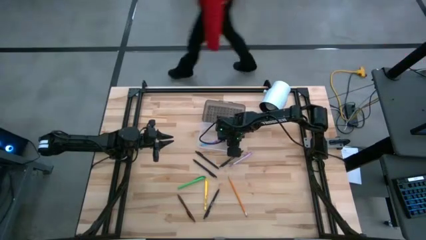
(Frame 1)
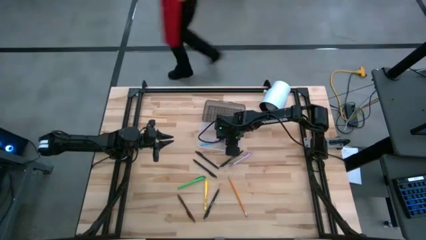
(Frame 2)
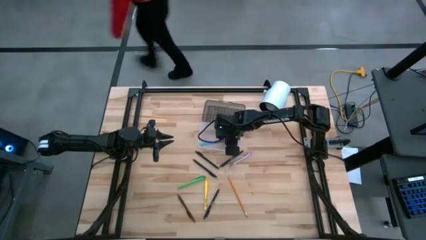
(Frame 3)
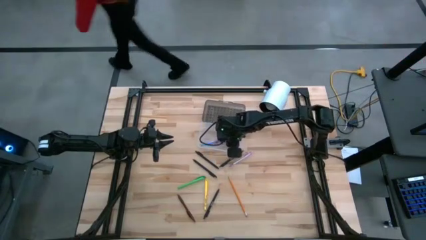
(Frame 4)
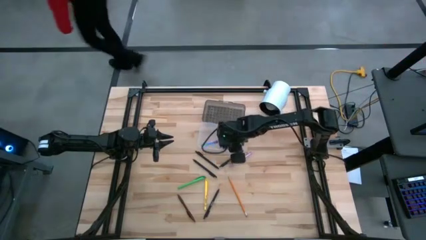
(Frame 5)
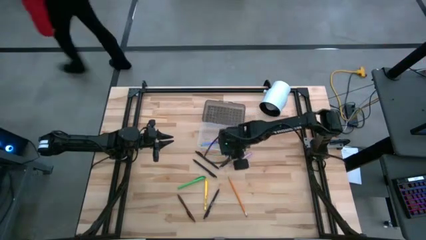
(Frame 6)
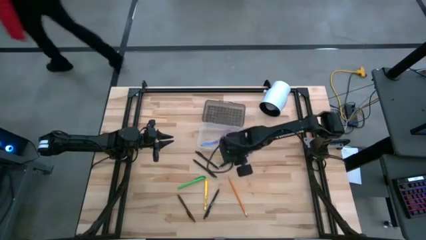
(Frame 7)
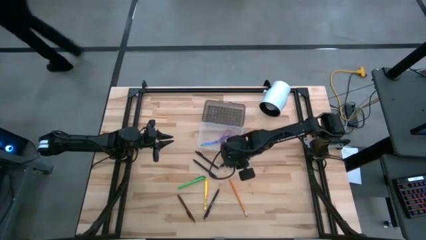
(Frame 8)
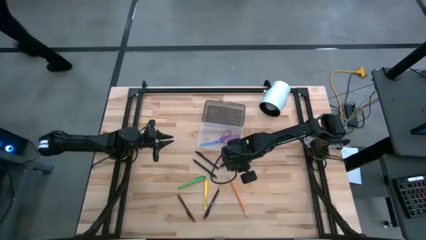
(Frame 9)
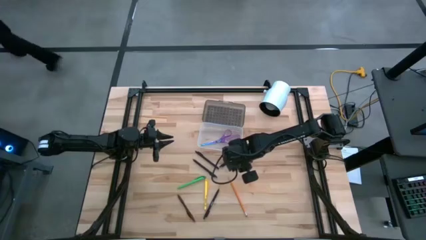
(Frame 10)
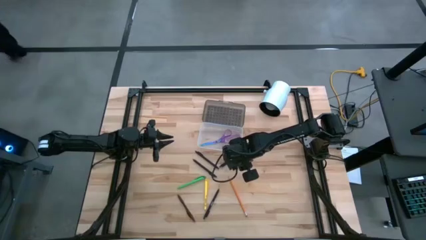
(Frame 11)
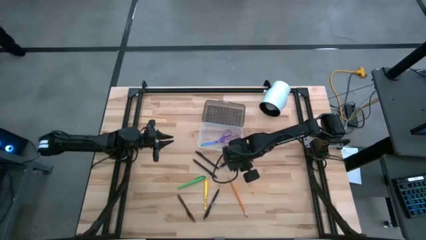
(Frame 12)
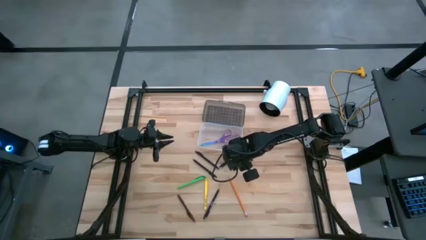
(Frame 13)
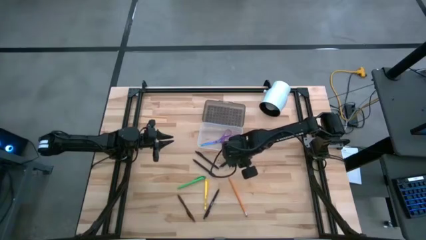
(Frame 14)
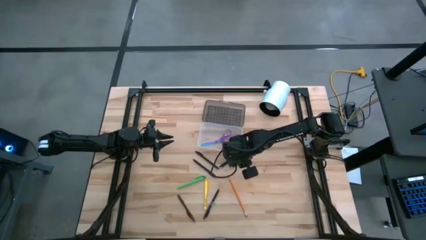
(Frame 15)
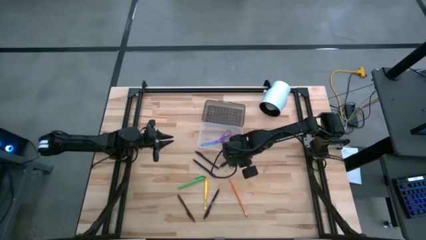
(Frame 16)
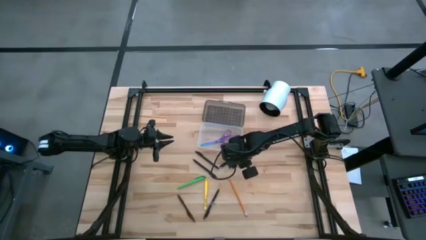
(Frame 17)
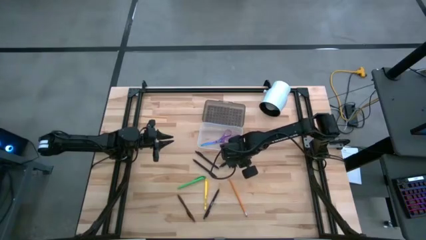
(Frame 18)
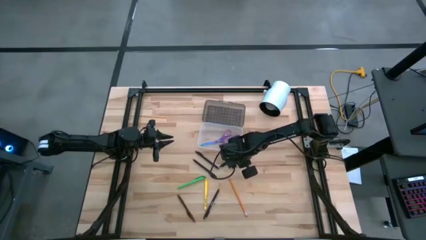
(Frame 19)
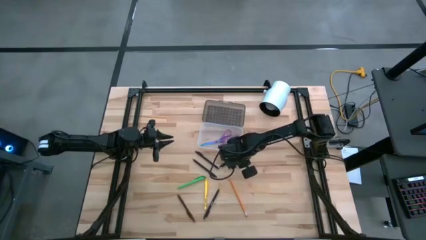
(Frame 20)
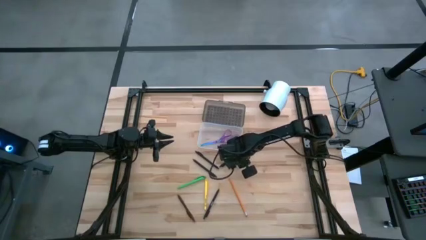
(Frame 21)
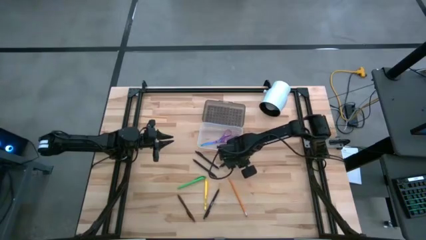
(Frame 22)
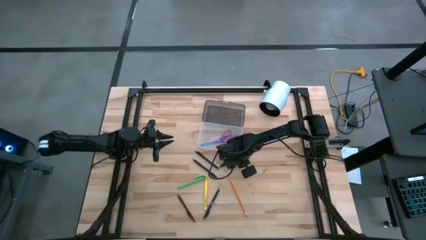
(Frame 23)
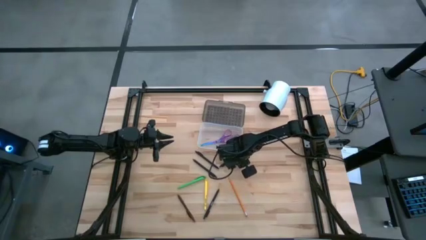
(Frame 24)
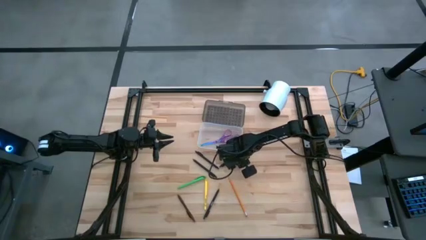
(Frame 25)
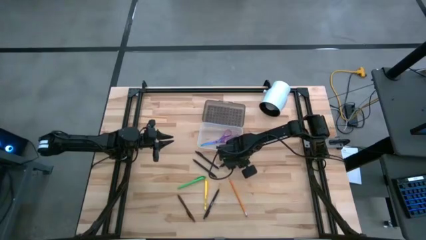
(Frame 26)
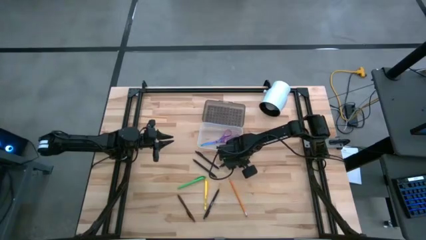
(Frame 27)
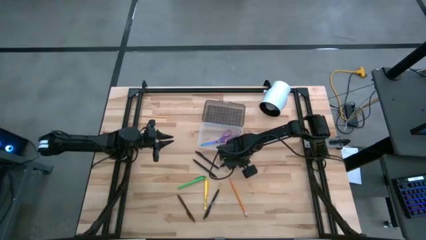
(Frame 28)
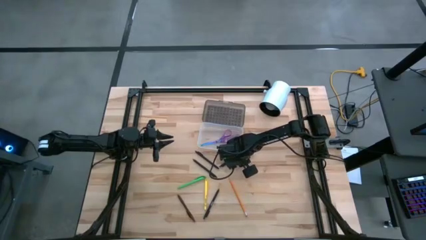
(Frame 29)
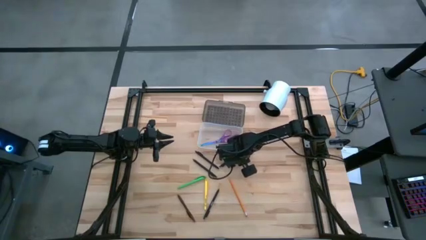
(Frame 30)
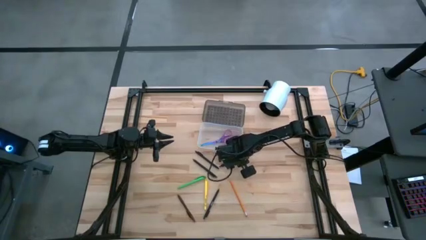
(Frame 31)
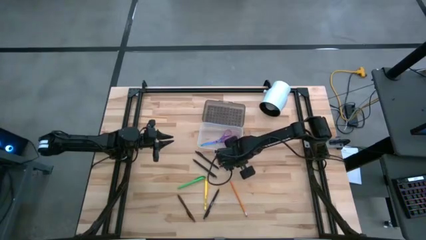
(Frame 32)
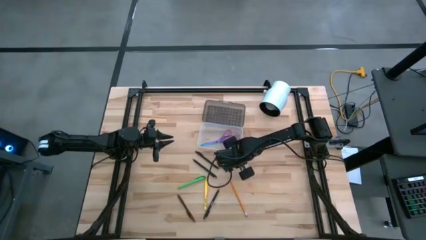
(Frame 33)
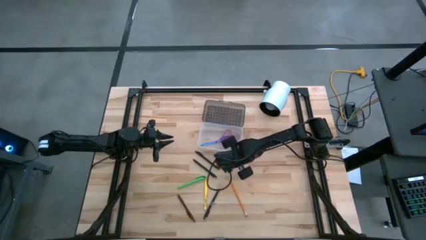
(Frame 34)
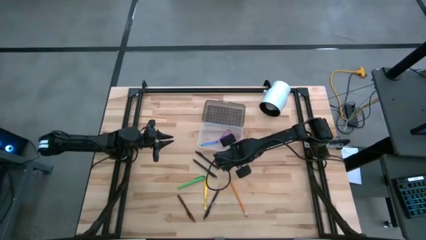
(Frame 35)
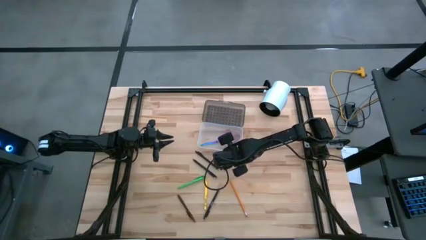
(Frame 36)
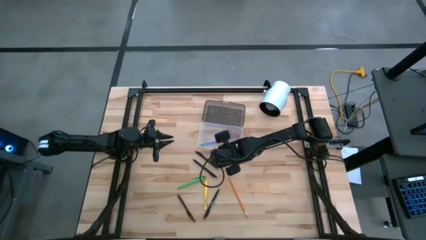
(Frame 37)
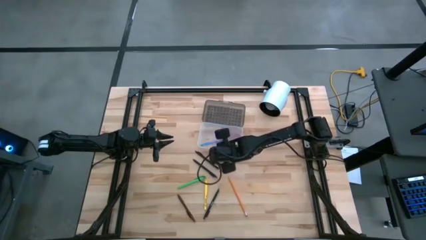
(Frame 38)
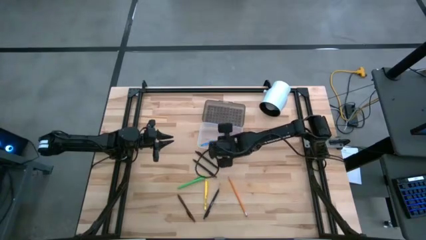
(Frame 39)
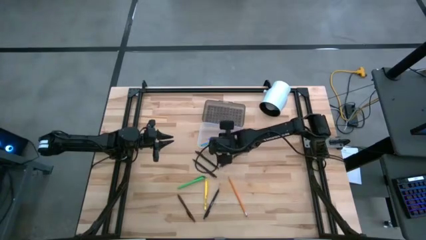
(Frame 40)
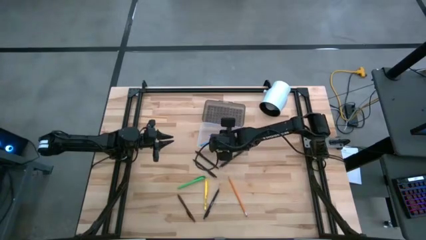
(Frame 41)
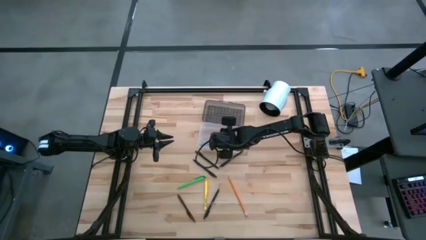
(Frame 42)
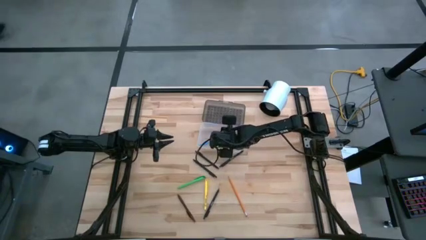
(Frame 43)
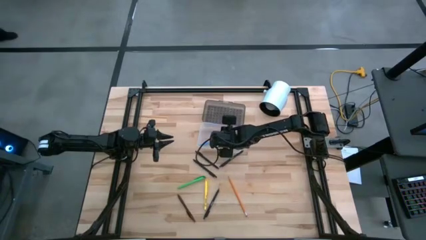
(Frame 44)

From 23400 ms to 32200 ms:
Task: Pick & place school supplies into a supply box
Put the purple pen into the supply box

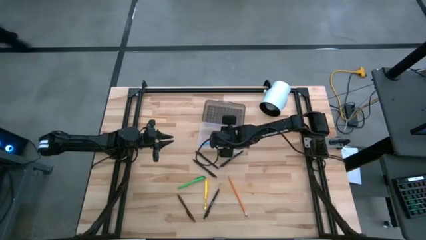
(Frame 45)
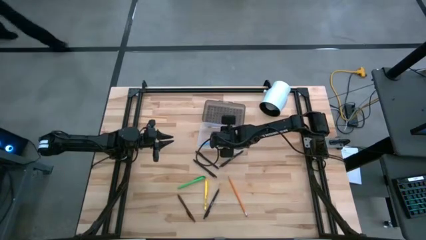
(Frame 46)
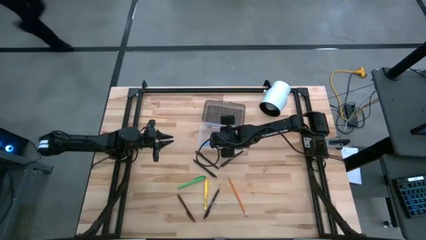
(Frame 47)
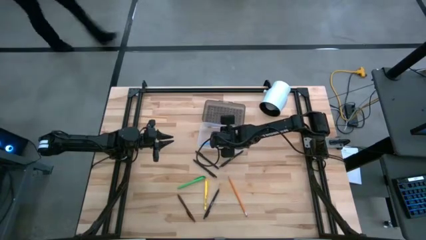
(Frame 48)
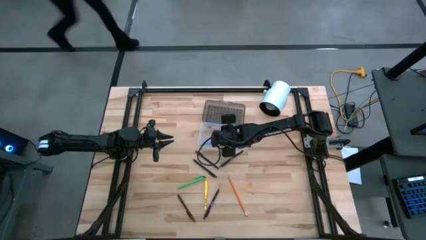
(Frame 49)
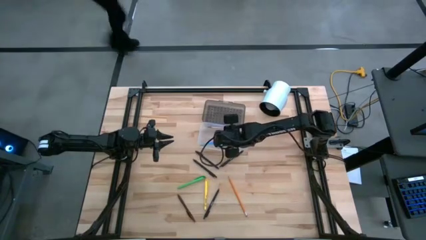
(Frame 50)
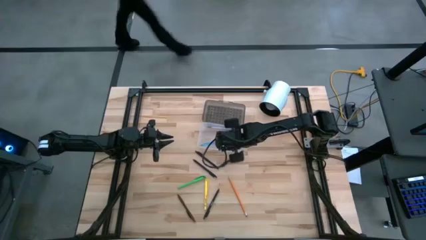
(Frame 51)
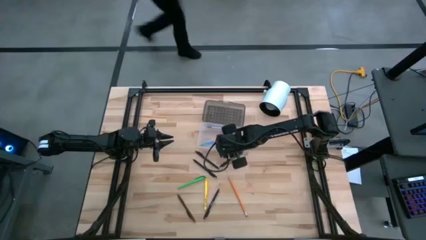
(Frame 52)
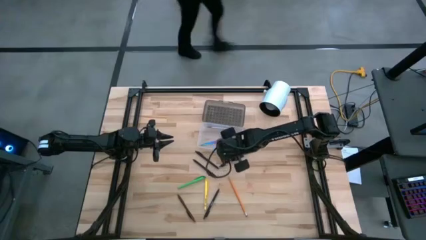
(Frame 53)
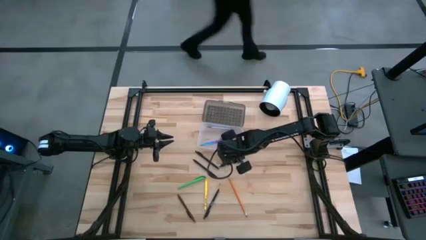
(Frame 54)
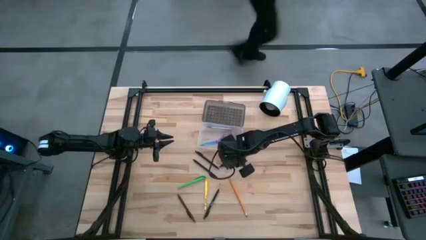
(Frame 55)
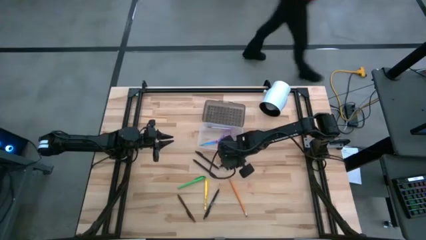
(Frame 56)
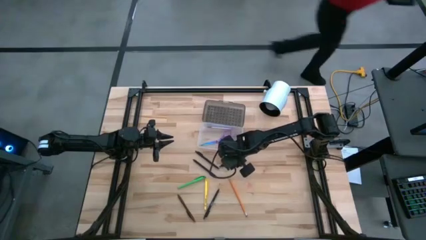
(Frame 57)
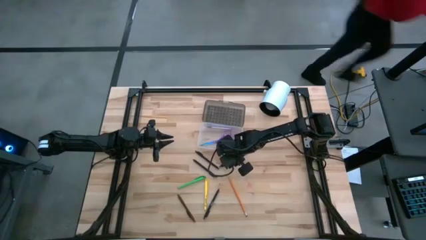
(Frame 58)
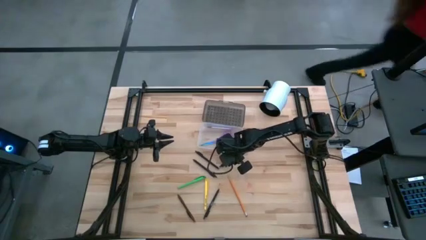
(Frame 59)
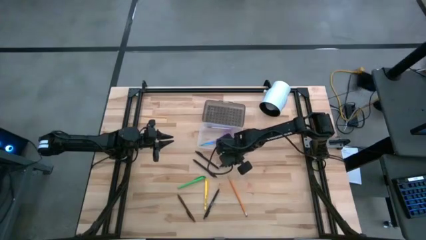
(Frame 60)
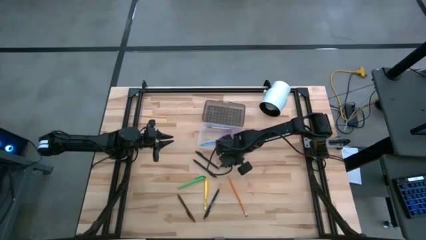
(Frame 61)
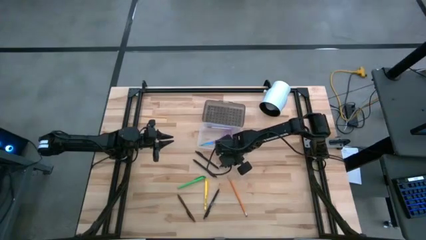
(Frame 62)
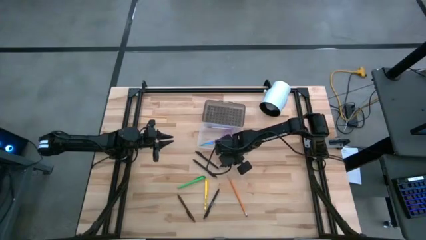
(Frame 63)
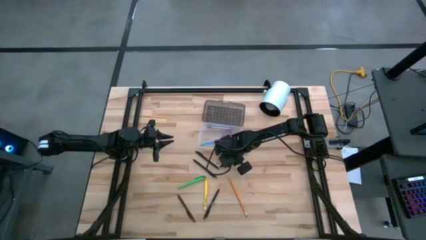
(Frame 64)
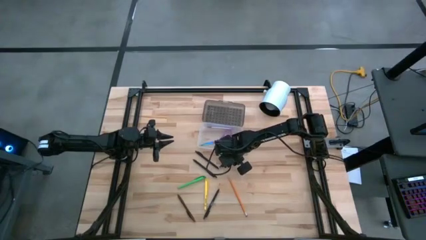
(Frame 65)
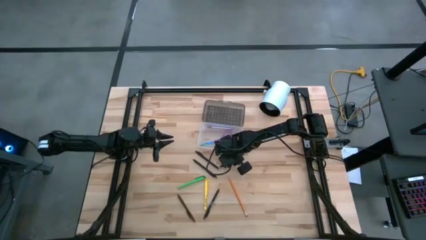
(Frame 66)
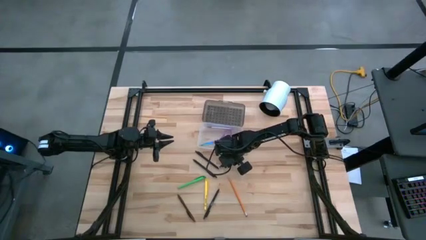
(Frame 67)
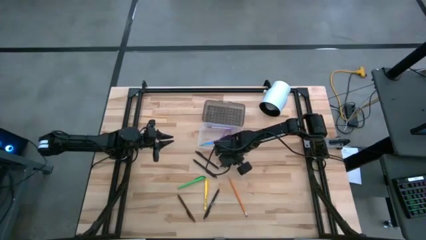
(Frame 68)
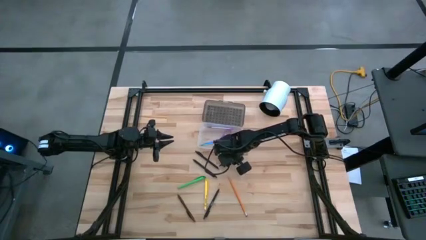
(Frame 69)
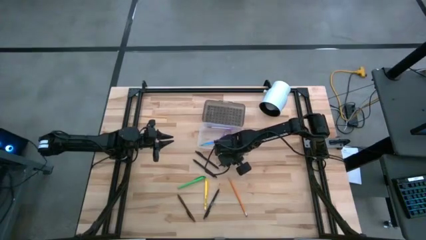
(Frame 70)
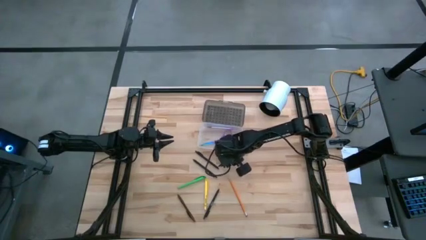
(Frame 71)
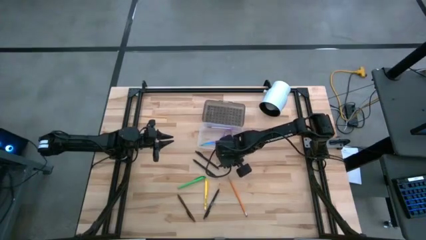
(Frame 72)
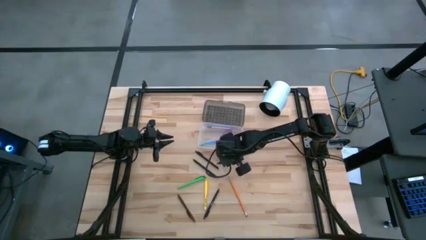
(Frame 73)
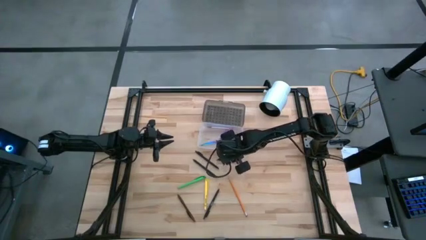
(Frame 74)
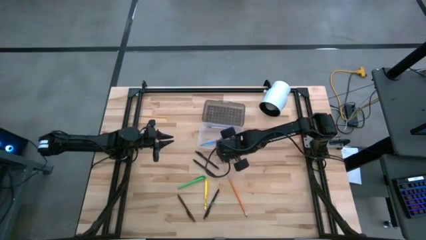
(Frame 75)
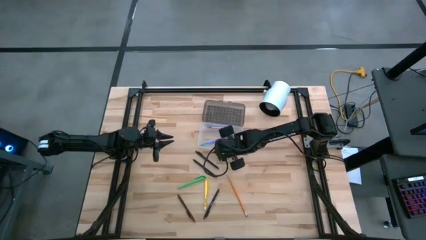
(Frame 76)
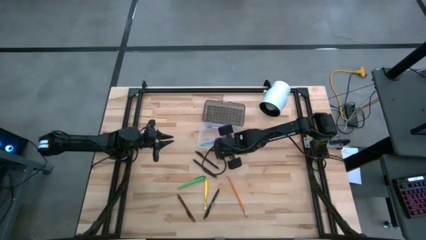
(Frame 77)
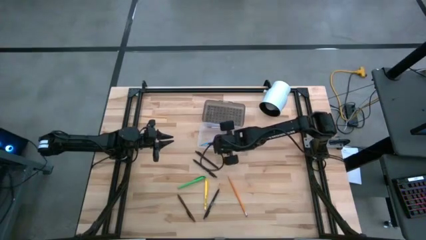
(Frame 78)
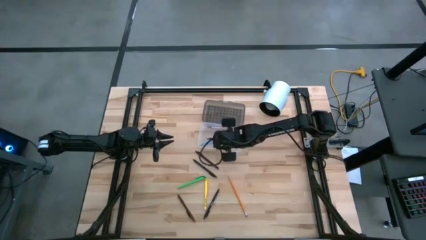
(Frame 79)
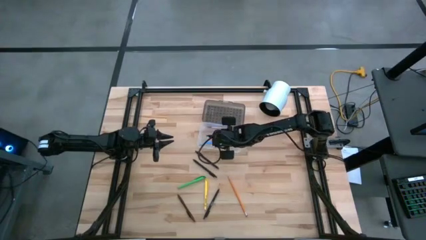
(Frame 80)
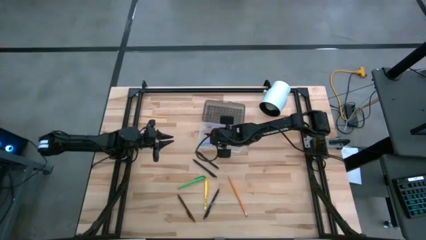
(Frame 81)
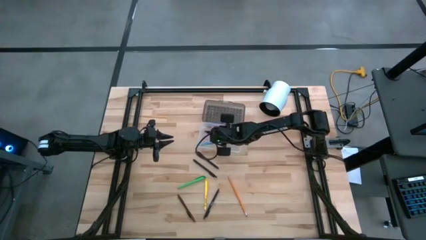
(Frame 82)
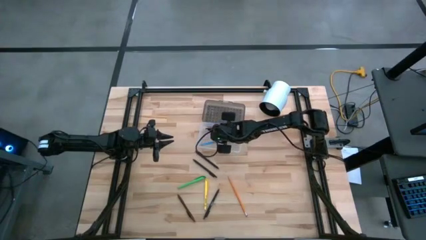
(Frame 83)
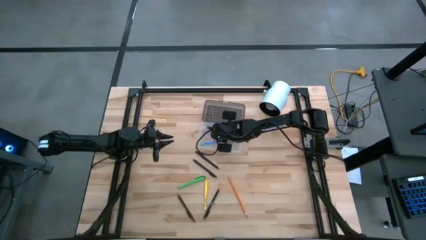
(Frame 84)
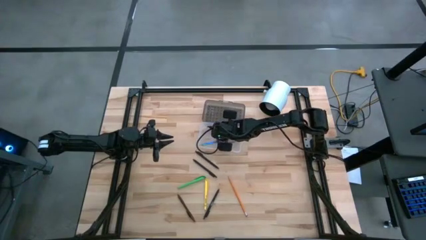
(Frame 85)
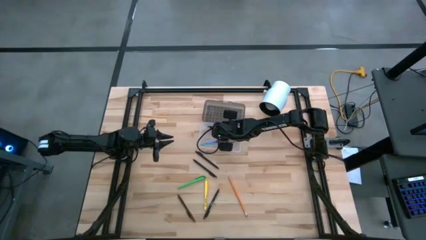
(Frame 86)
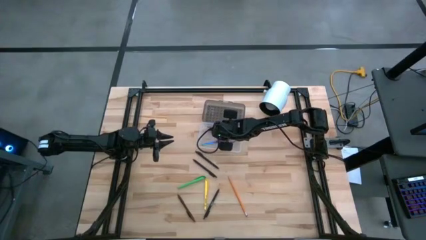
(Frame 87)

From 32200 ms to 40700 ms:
Put the black pen into the supply box
